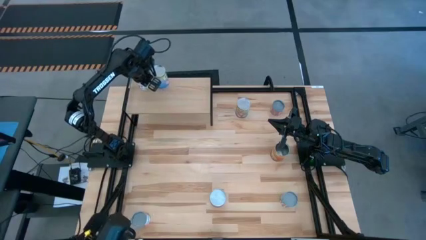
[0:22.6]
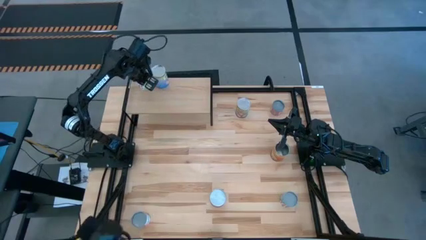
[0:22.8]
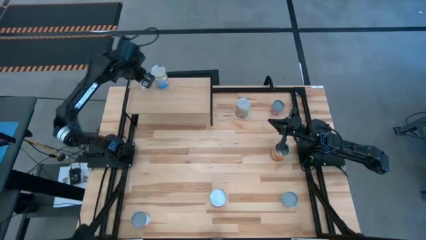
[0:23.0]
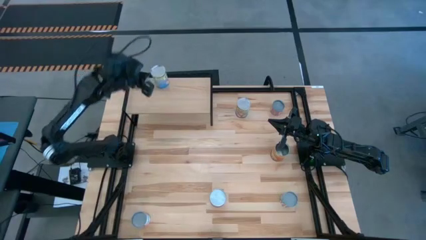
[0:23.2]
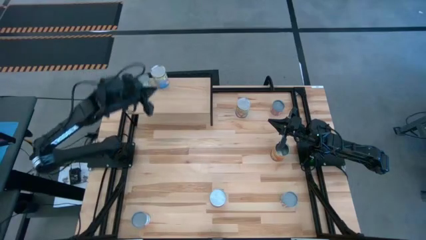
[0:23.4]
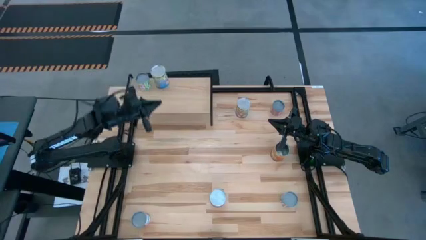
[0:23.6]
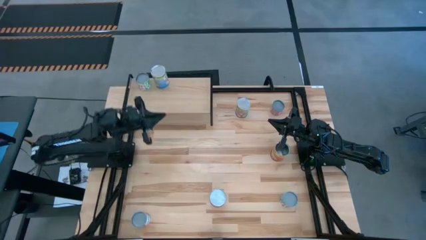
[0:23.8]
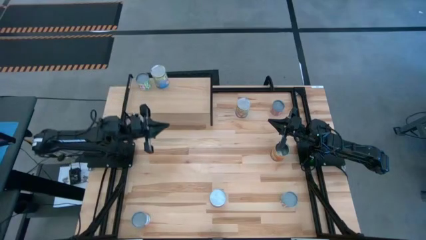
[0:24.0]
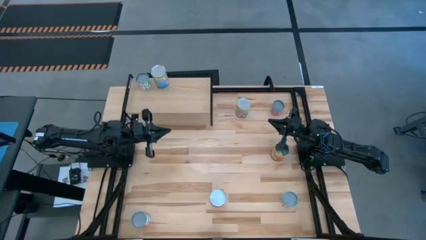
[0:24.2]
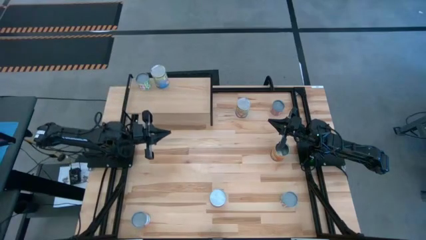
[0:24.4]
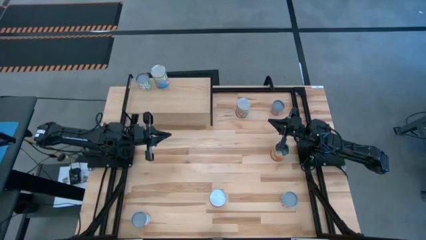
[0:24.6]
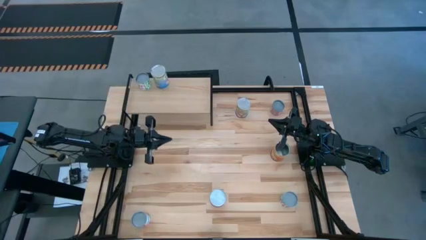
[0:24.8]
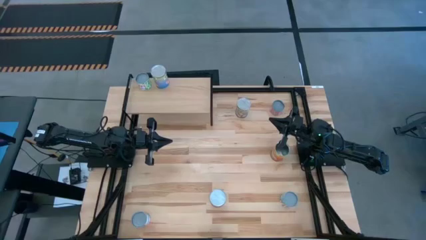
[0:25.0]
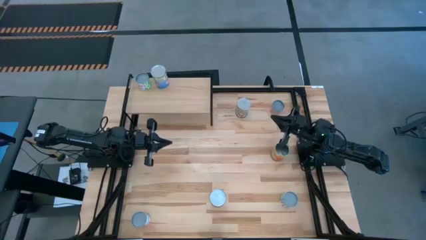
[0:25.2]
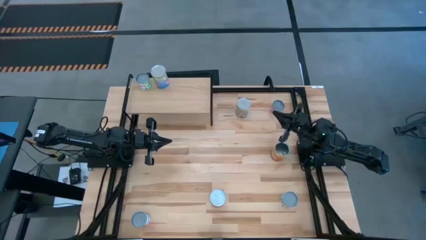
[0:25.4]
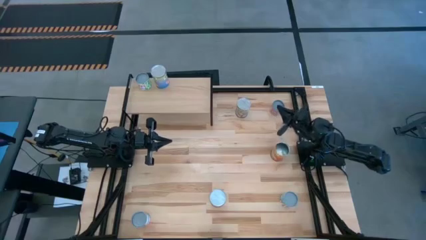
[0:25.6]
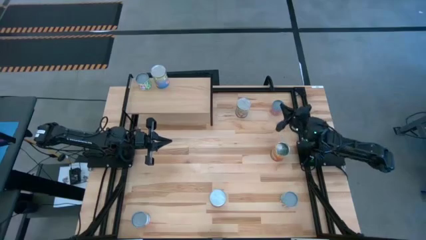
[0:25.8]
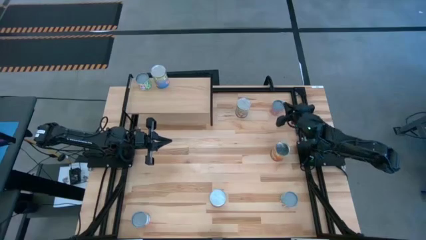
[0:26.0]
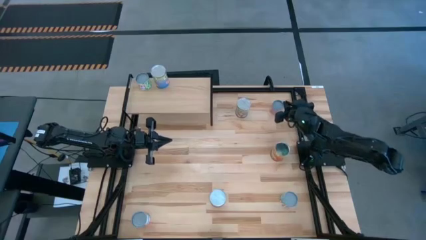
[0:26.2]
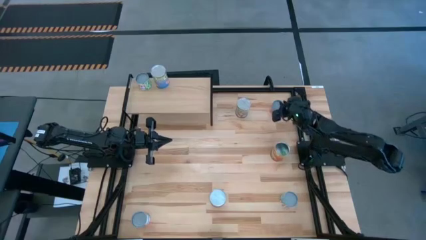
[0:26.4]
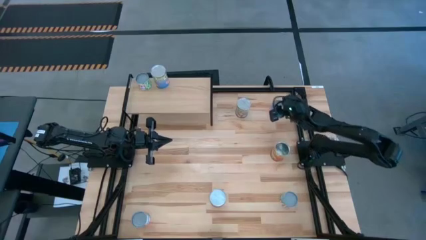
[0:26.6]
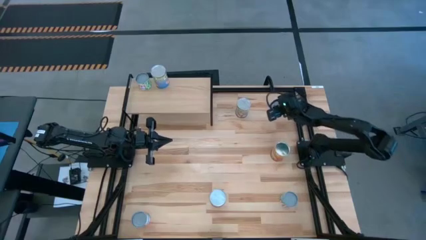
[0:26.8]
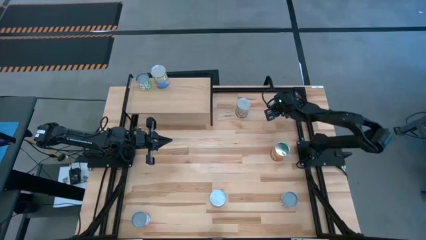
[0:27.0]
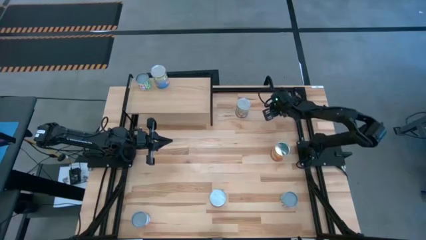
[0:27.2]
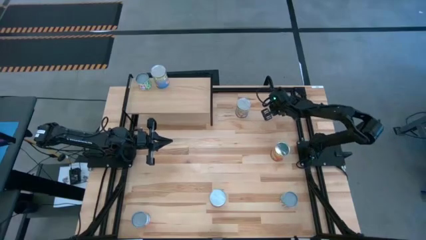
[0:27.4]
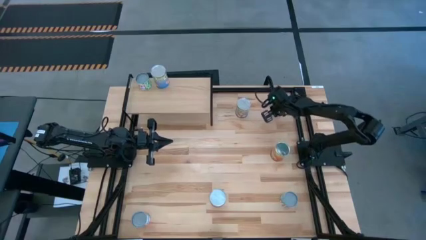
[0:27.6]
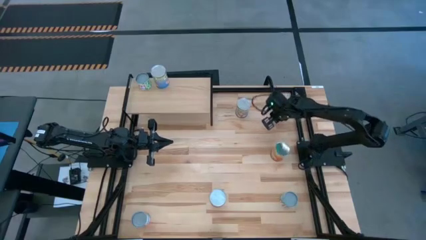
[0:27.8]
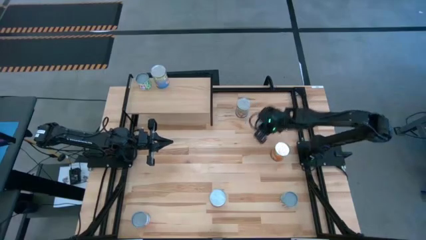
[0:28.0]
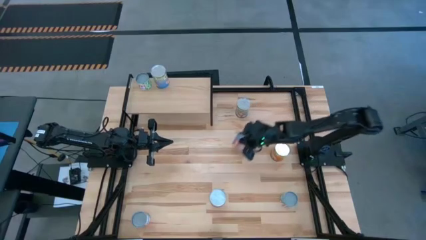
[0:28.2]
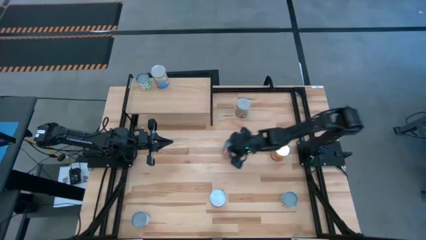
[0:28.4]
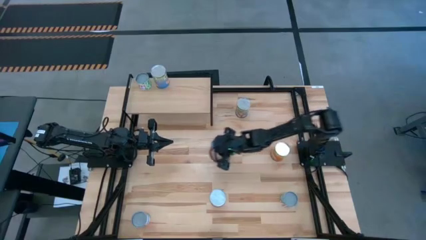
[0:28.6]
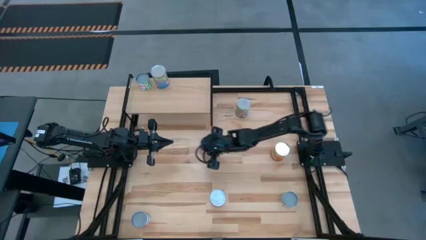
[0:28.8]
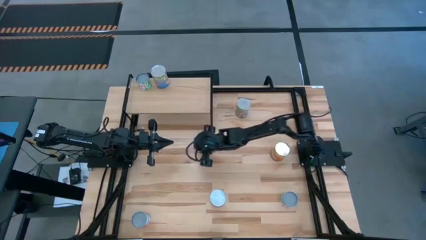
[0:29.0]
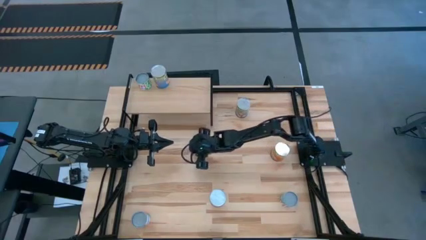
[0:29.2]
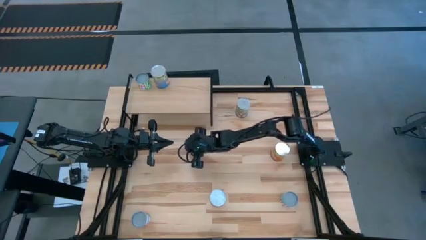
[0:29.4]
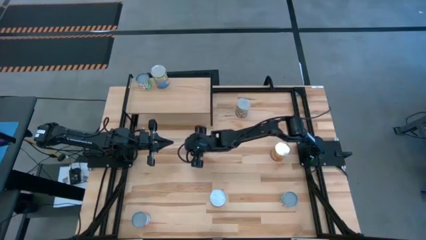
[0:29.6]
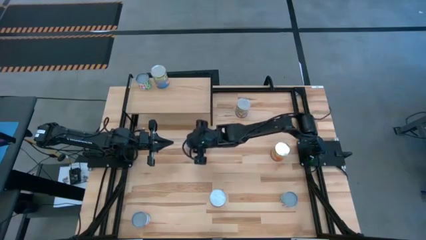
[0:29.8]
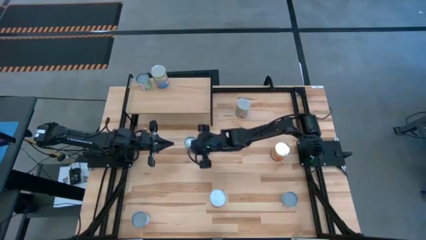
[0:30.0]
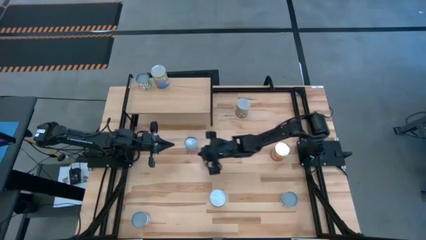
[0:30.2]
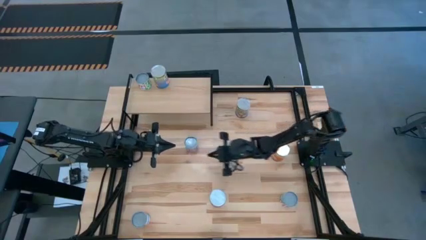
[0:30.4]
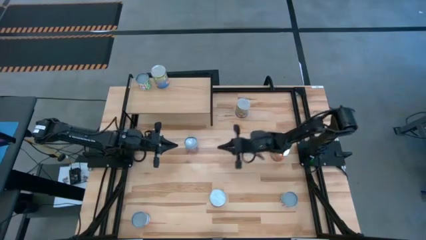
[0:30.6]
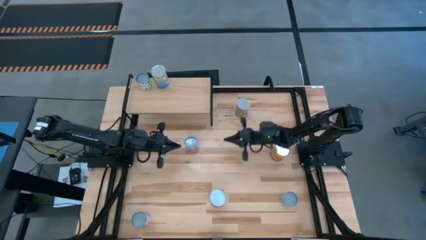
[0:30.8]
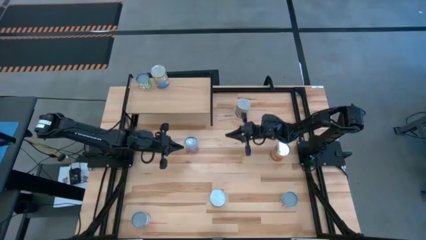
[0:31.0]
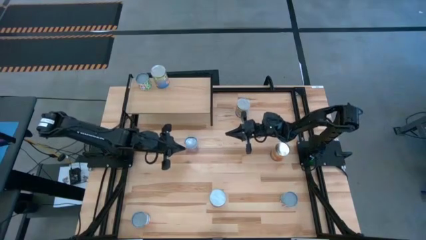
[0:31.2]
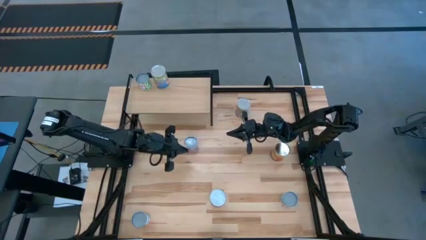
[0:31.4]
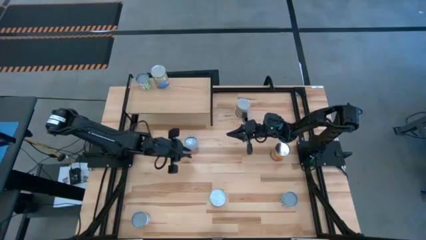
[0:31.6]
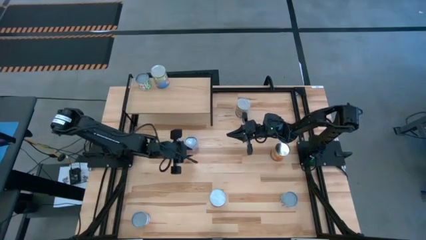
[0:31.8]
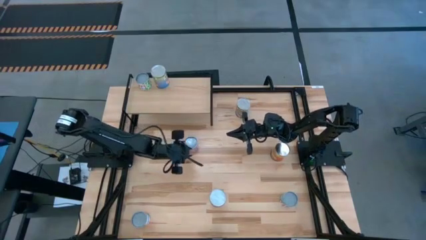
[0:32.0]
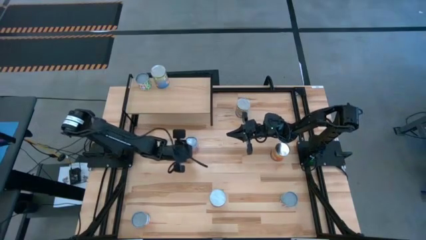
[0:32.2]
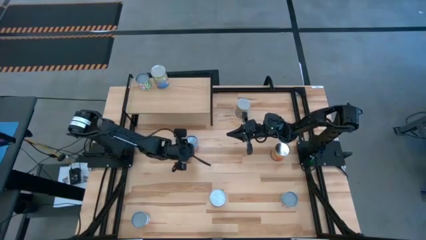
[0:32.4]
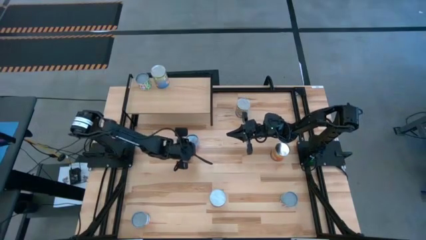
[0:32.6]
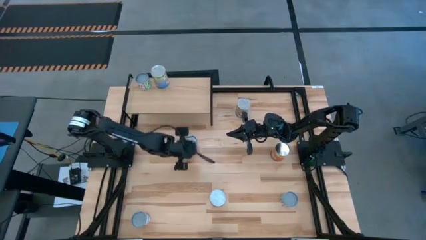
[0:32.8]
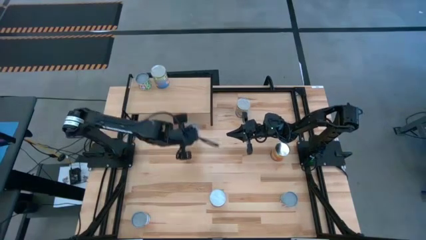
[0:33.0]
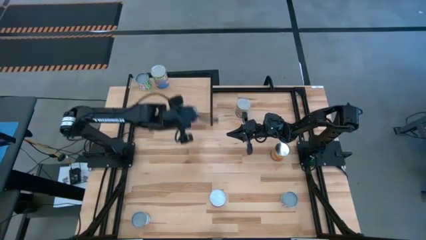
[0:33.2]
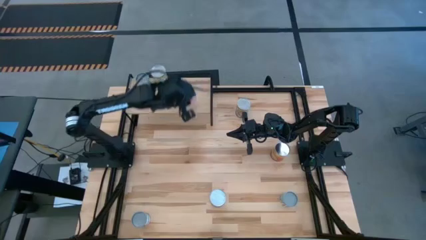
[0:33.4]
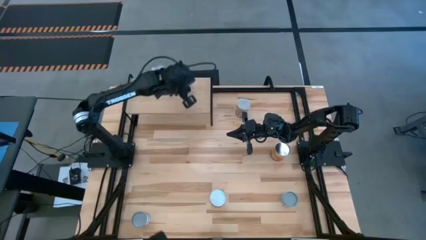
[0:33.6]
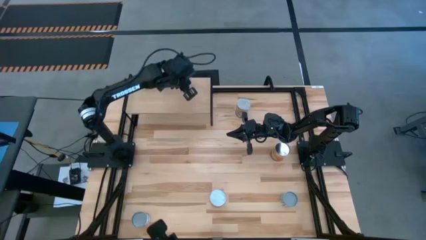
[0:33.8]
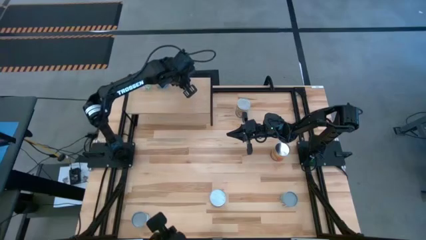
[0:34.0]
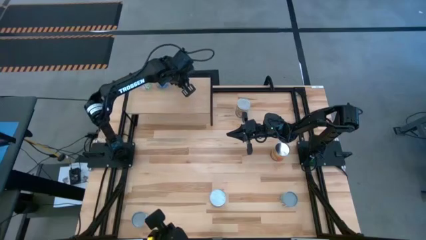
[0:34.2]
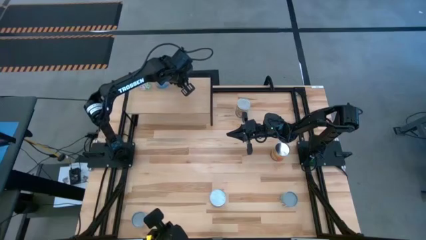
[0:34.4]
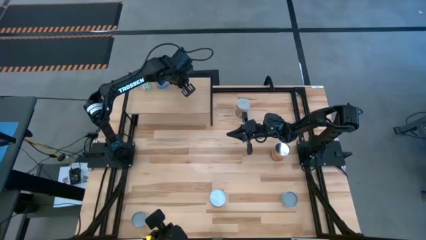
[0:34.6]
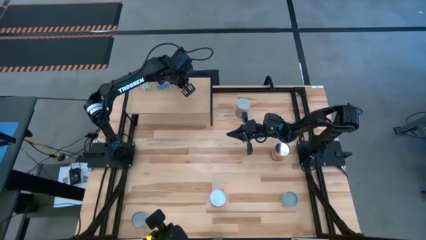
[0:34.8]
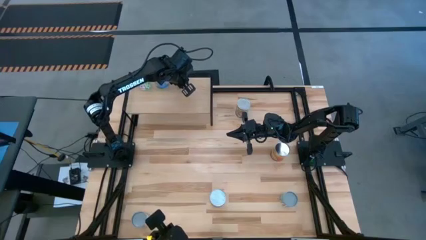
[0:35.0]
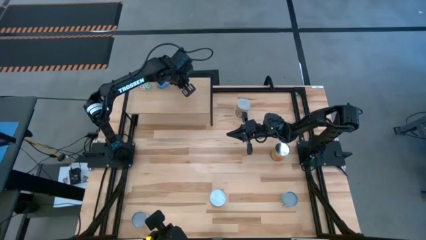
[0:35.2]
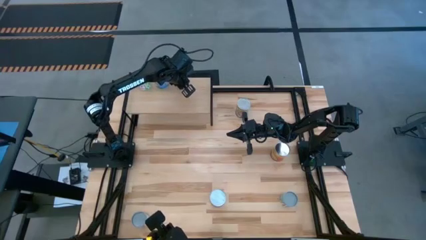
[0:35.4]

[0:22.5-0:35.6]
Task: Pick and place cans onto a shelf
Put the red can on the shelf
